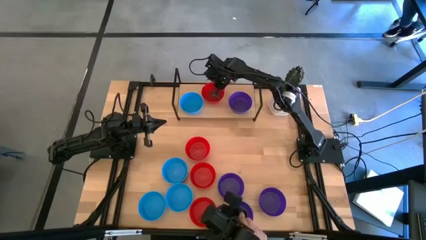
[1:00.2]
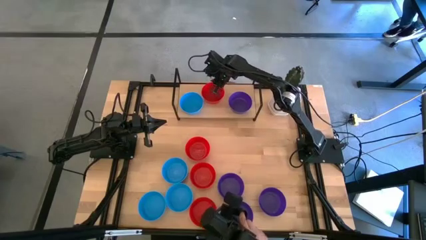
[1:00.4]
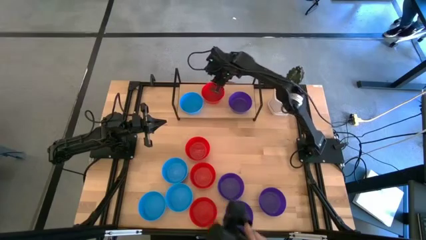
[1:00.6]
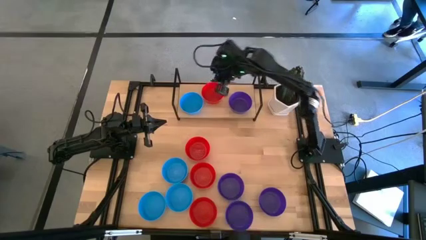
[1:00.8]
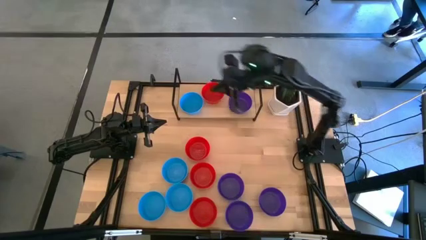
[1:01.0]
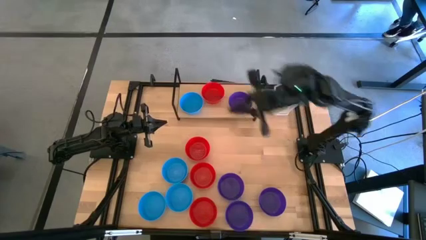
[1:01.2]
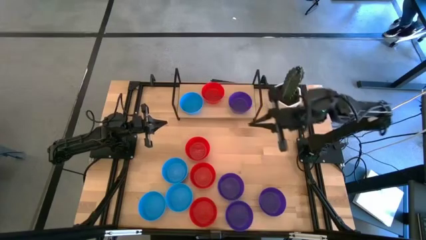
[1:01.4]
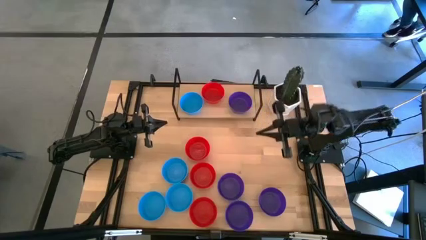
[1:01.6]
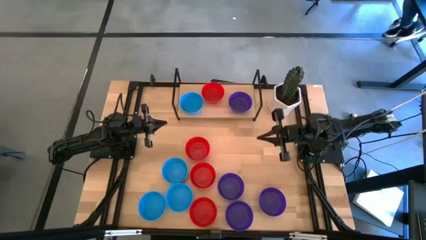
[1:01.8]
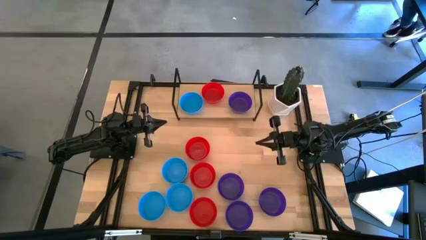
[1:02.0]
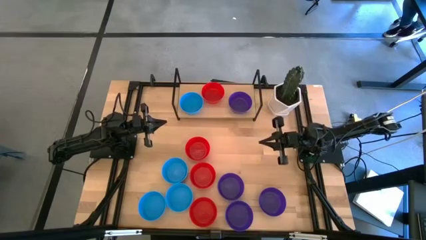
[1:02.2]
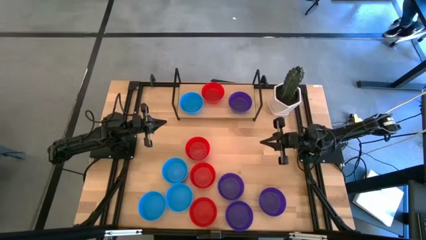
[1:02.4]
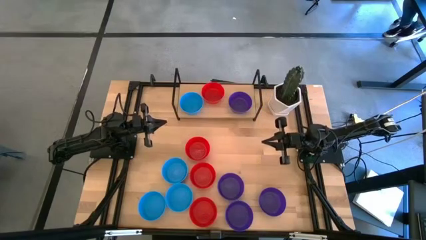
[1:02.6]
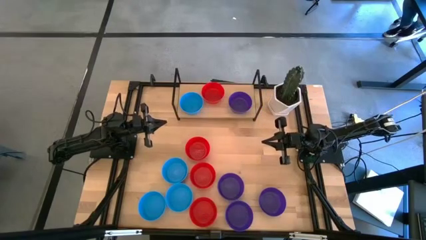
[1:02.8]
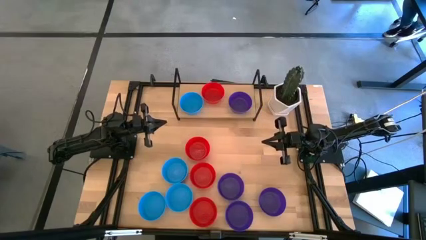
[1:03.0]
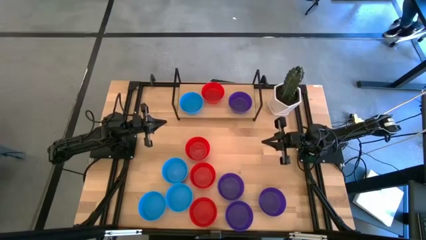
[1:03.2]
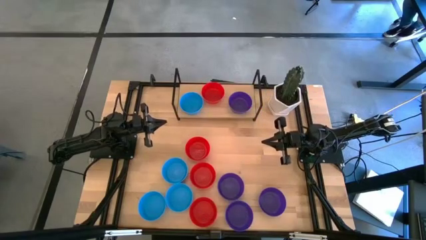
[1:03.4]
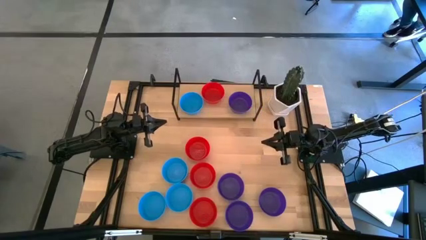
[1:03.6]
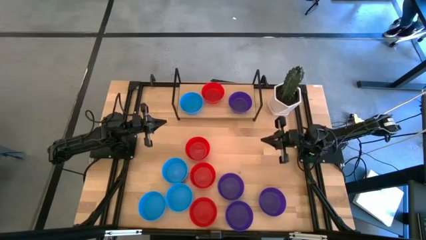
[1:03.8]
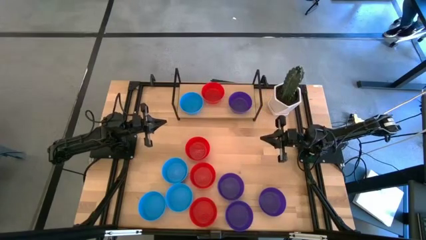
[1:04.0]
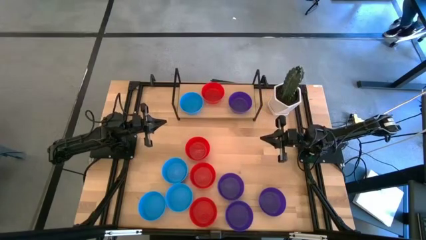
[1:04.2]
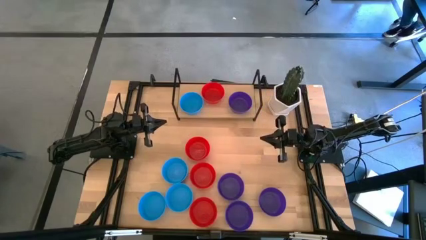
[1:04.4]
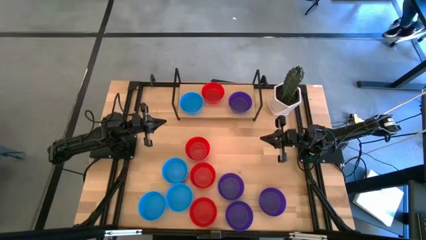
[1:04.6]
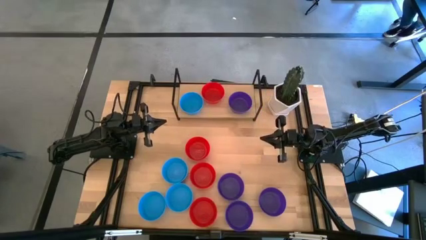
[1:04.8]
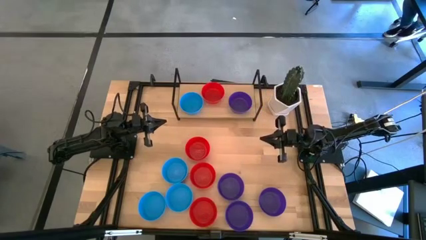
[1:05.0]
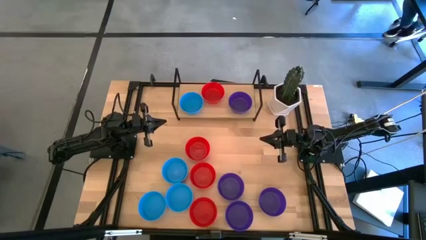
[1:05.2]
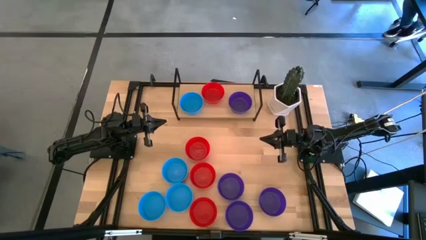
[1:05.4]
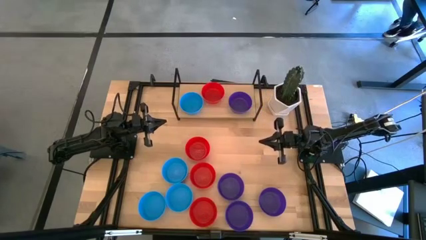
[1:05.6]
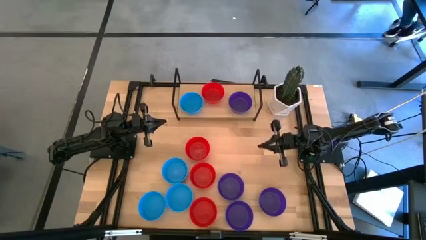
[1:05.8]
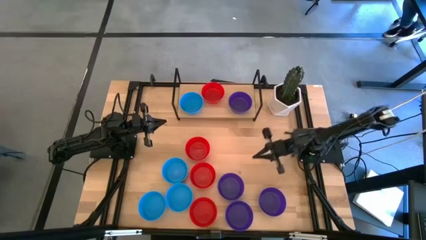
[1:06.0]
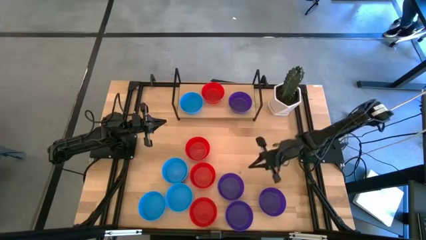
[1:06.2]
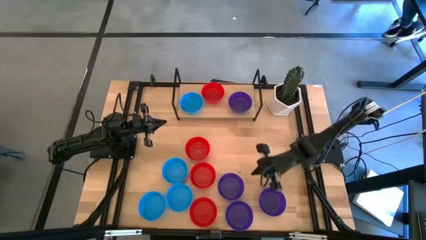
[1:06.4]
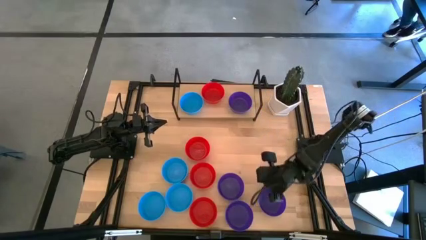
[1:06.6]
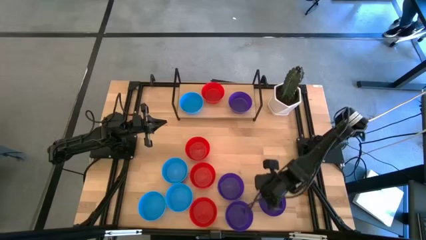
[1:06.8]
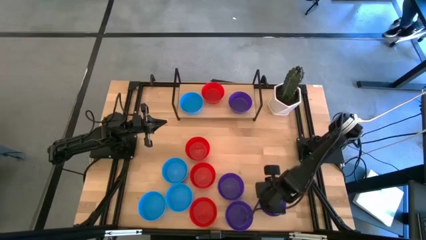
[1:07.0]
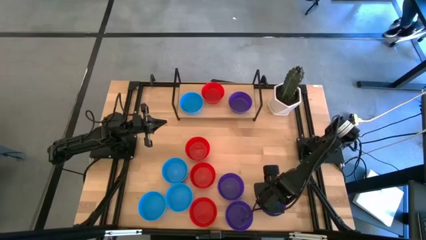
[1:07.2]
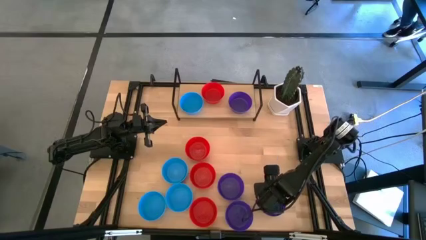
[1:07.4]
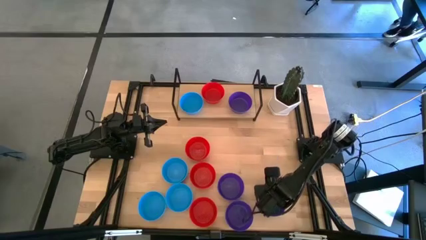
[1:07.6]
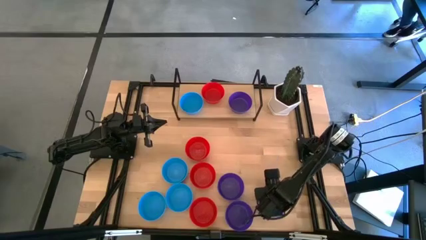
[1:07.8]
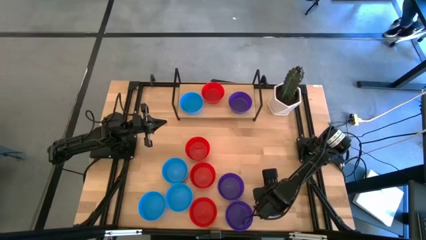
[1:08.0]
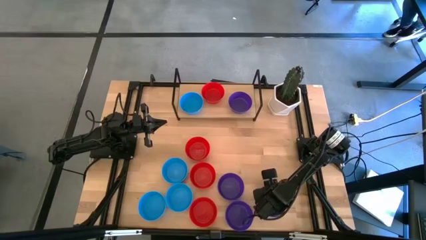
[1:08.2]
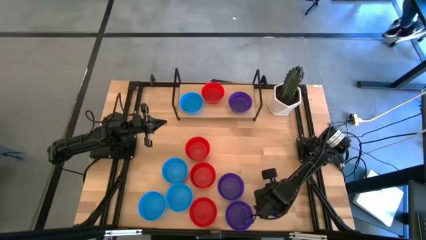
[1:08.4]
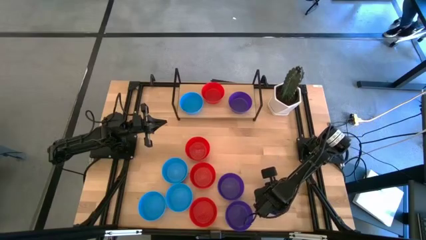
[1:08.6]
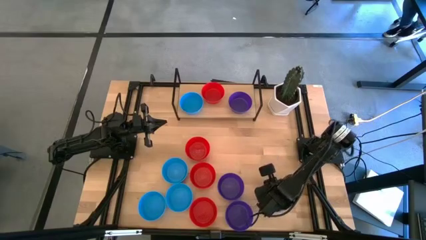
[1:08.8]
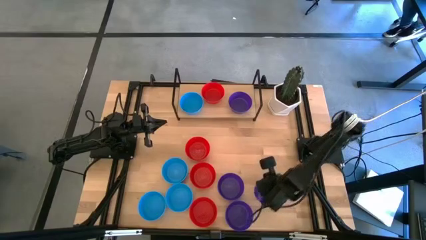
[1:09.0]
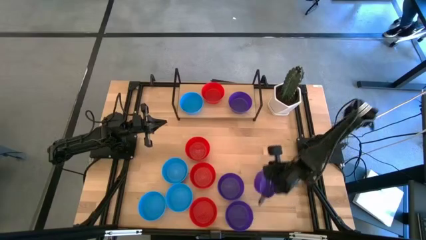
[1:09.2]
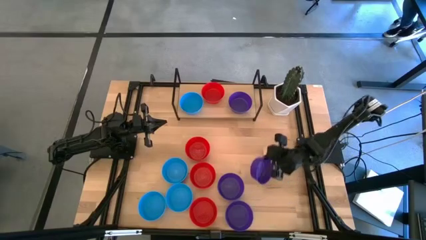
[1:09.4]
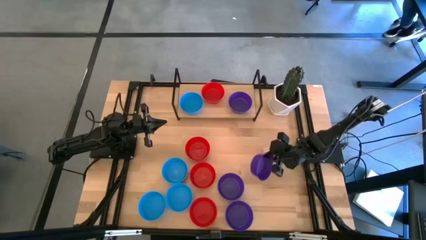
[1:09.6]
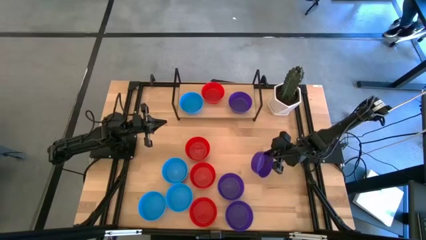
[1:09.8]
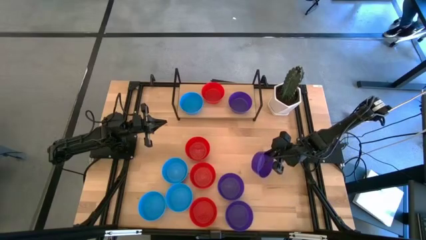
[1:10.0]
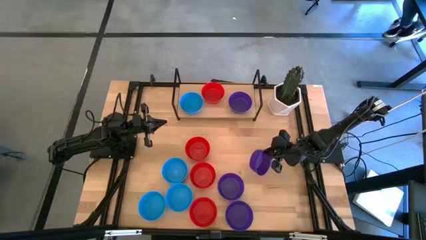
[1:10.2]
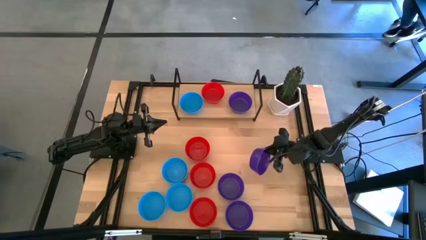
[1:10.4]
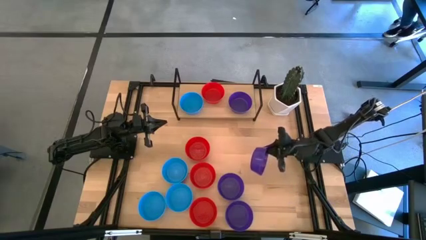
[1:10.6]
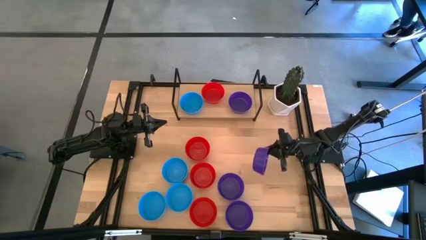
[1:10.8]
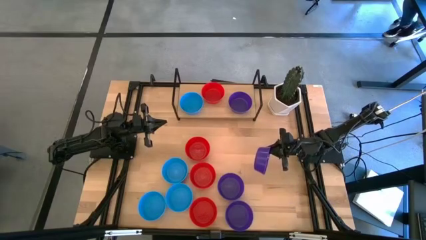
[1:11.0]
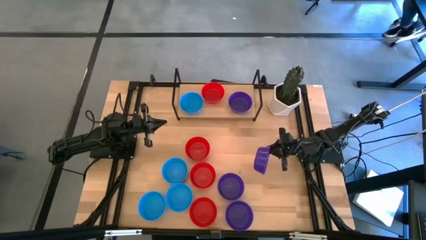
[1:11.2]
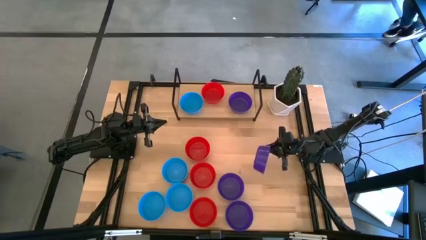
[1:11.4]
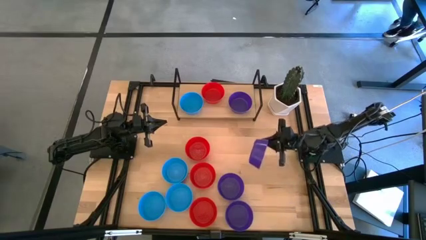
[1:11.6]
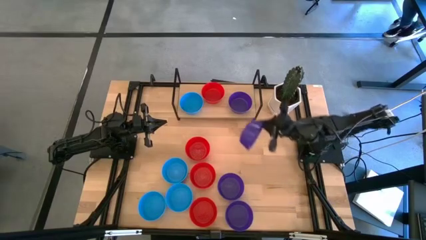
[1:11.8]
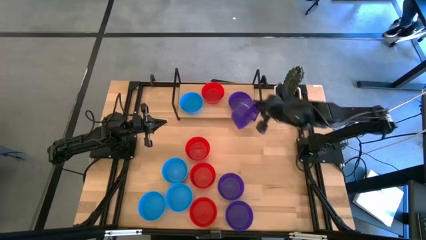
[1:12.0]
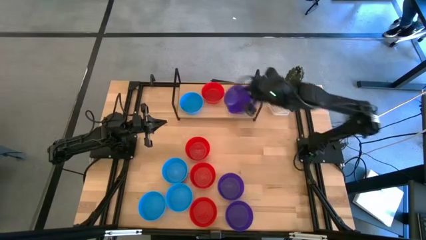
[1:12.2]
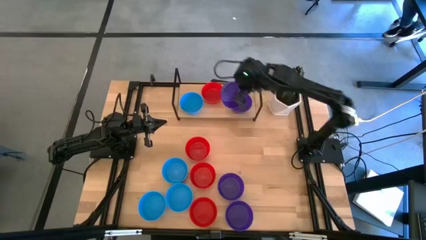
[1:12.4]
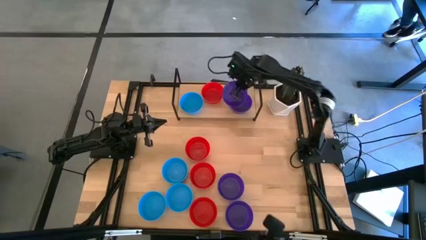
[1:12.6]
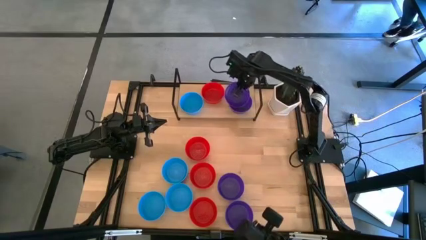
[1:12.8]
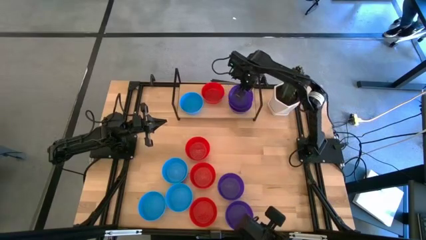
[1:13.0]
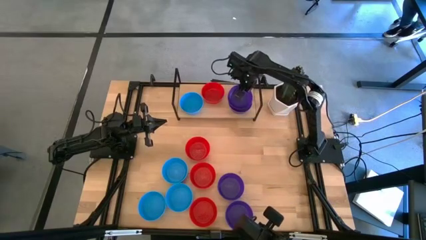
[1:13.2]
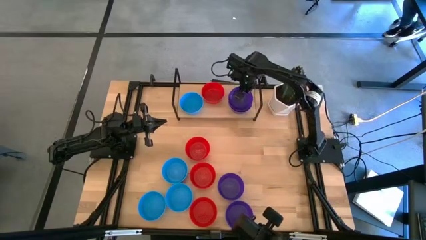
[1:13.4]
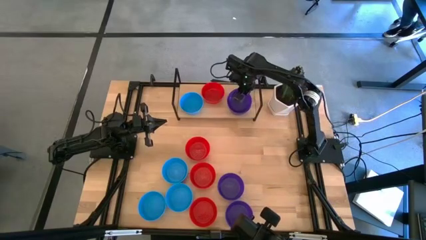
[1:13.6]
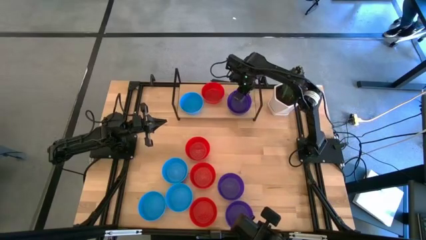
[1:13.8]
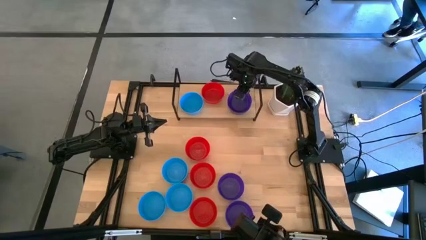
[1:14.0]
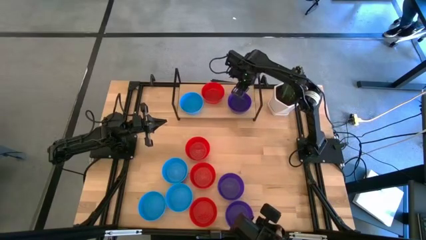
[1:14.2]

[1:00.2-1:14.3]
Task: Pick & Place Mini bowls
Stack the purple bowl on top of the purple bowl on the shelf

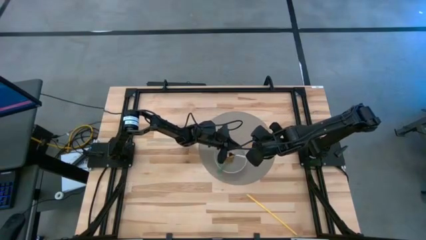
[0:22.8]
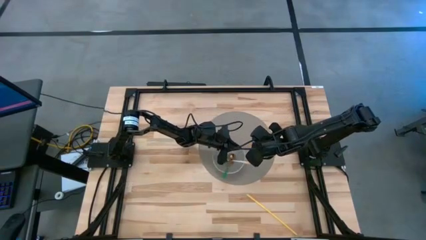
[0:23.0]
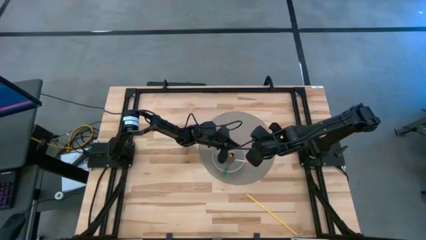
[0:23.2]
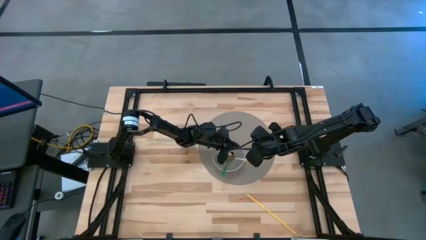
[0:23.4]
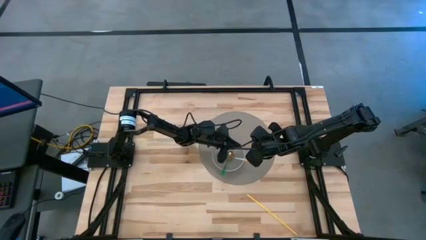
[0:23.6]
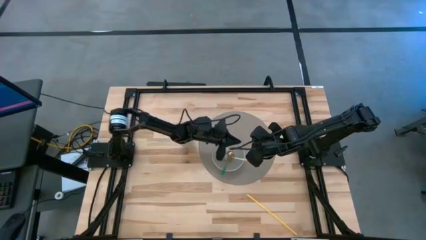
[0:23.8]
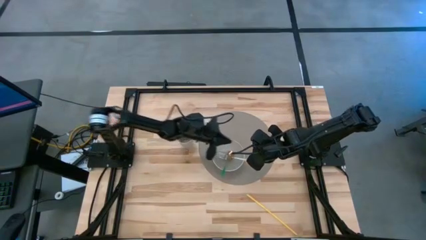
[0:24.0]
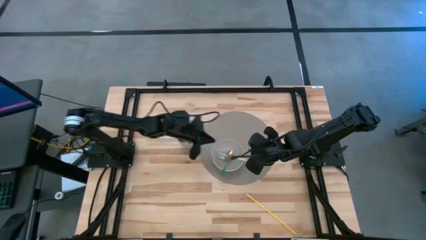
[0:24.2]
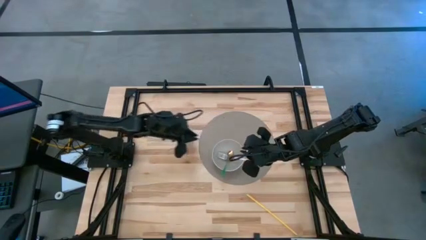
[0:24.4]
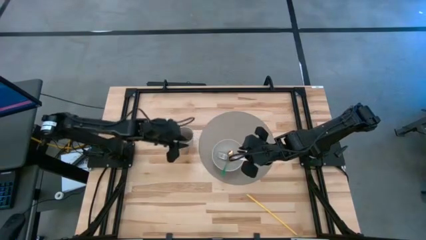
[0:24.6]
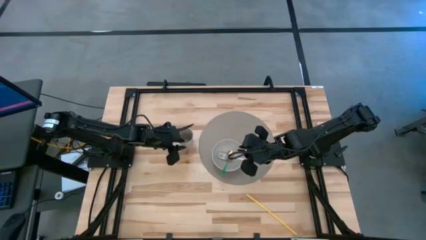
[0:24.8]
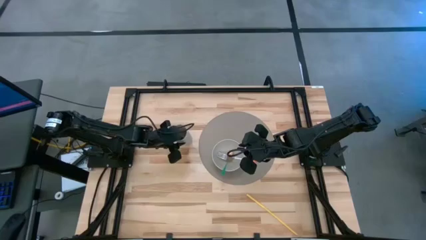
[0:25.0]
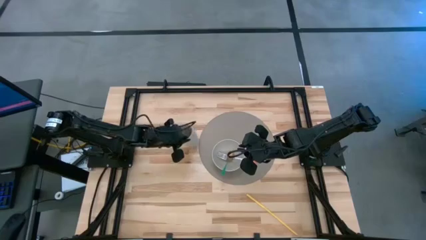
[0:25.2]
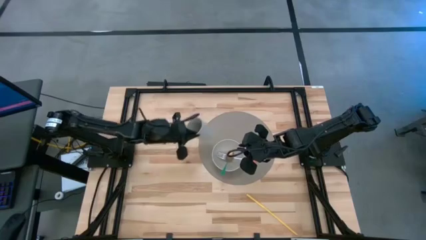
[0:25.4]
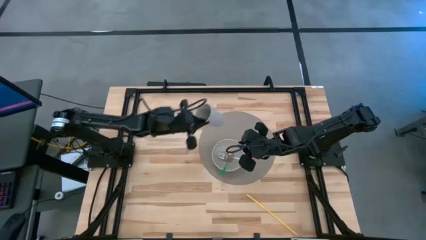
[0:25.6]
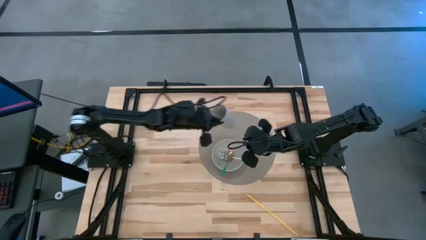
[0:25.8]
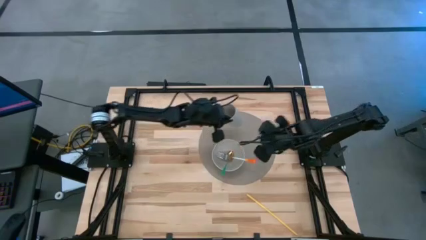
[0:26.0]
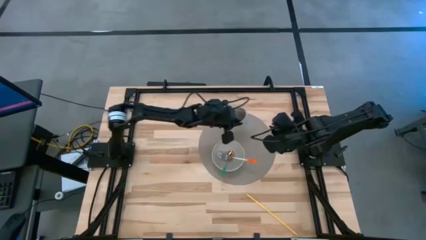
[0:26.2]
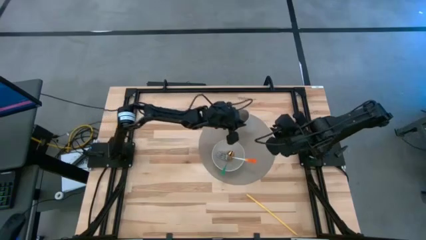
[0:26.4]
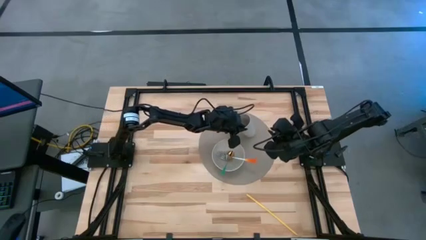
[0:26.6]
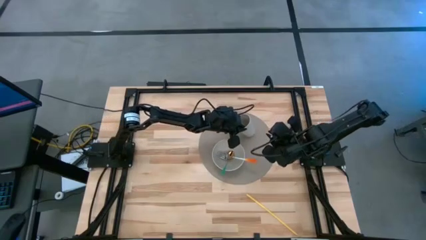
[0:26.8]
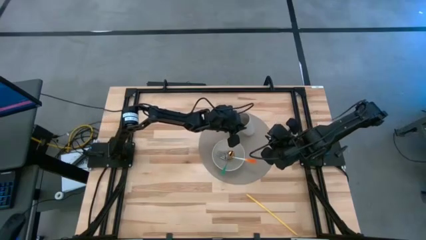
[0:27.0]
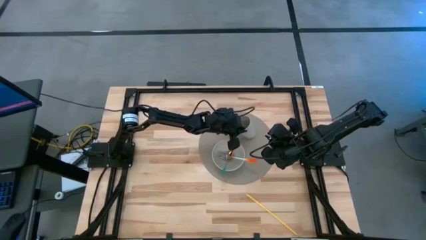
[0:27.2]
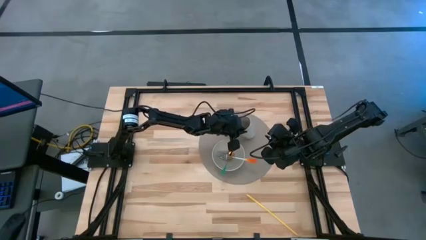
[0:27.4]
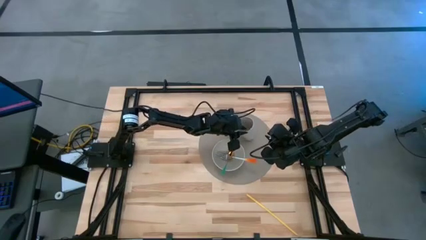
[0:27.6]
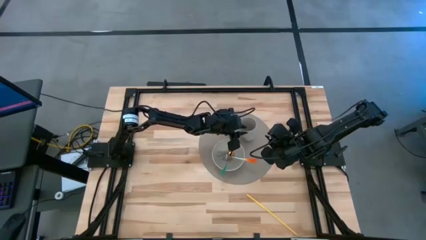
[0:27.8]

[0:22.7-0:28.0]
Task: Pick & Place Utensil
Put the gray cup on the top right side of the table mat
